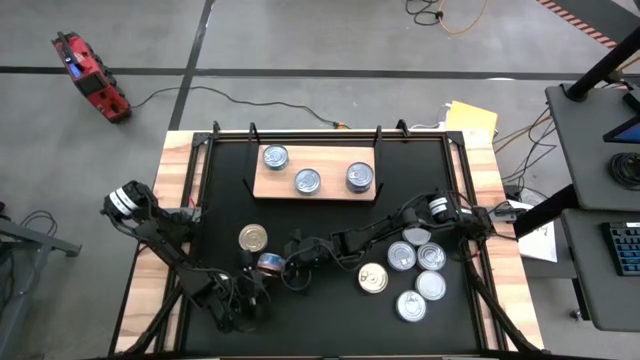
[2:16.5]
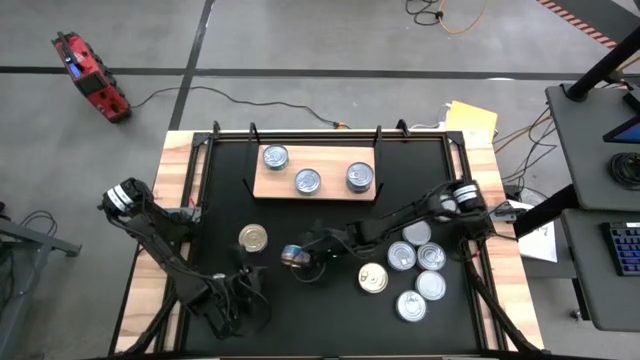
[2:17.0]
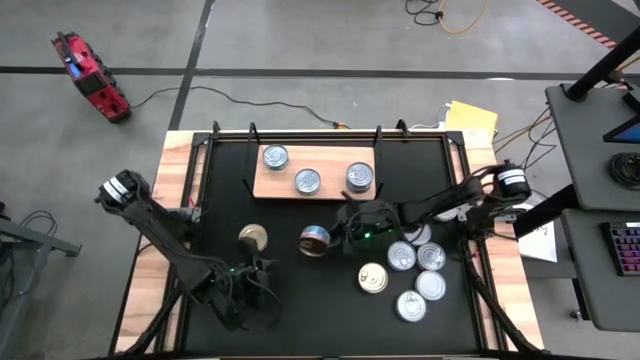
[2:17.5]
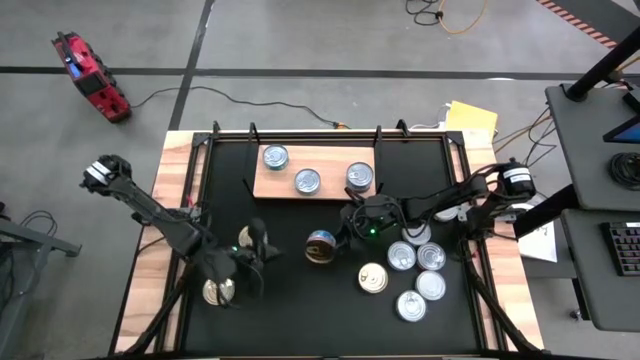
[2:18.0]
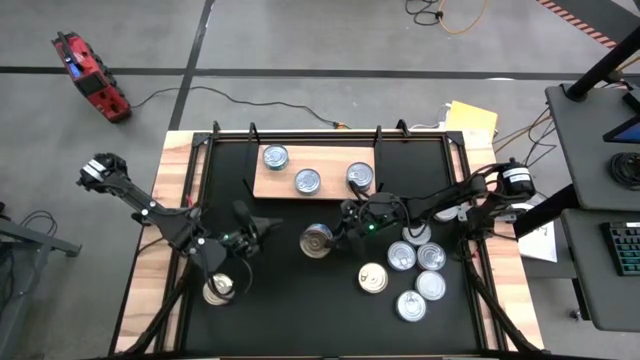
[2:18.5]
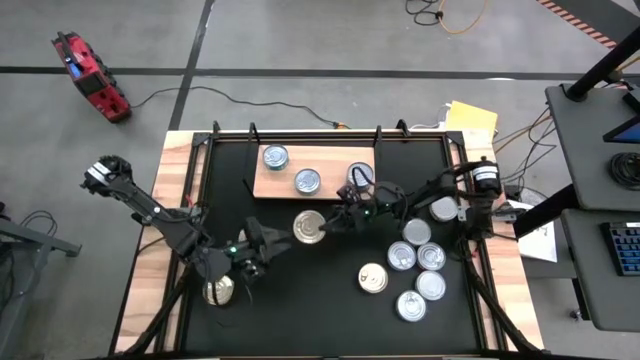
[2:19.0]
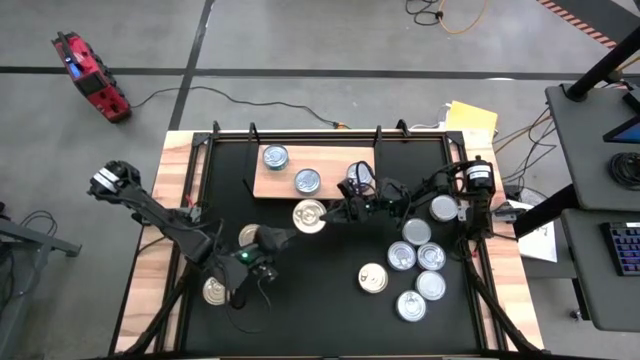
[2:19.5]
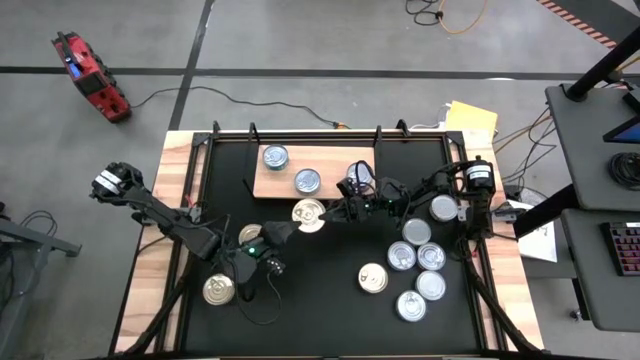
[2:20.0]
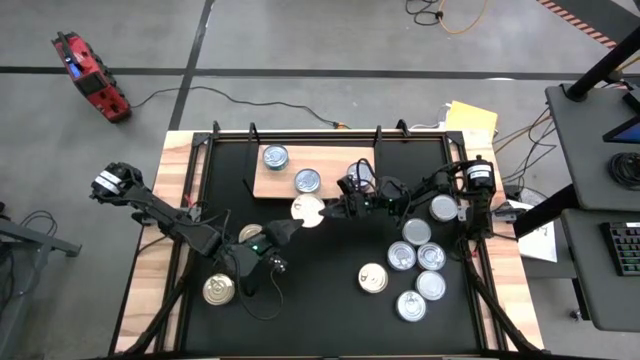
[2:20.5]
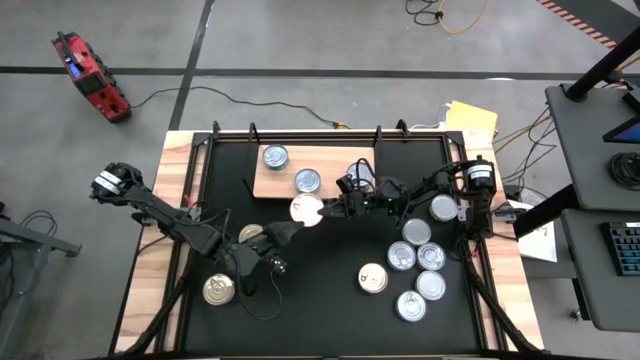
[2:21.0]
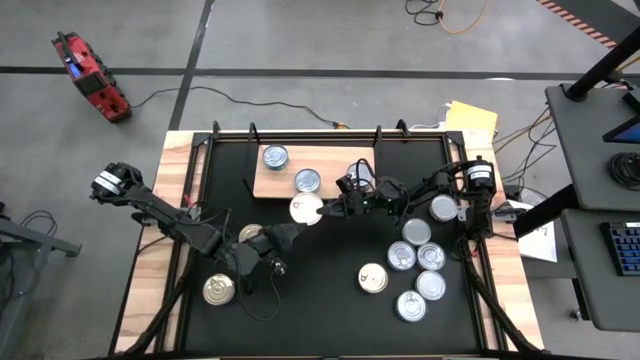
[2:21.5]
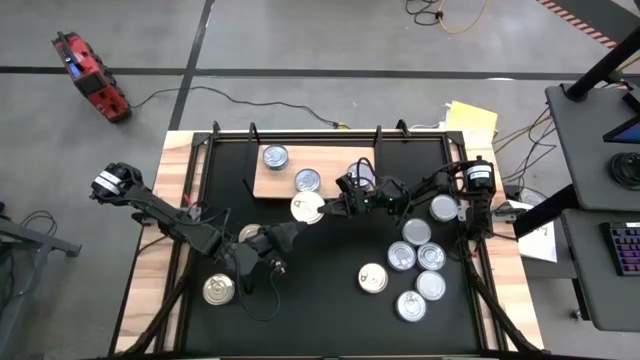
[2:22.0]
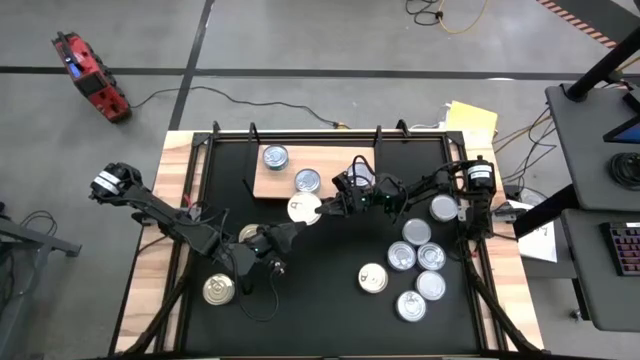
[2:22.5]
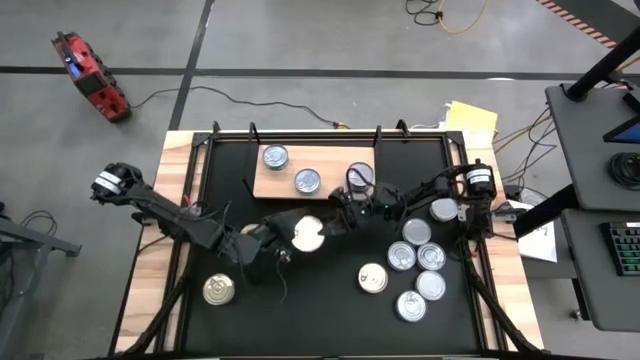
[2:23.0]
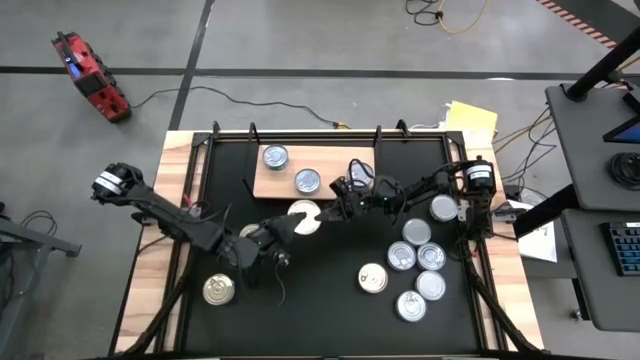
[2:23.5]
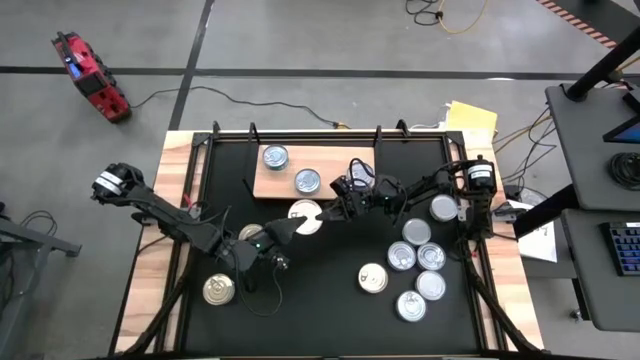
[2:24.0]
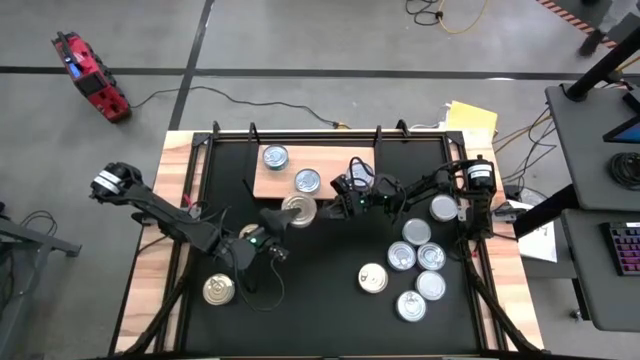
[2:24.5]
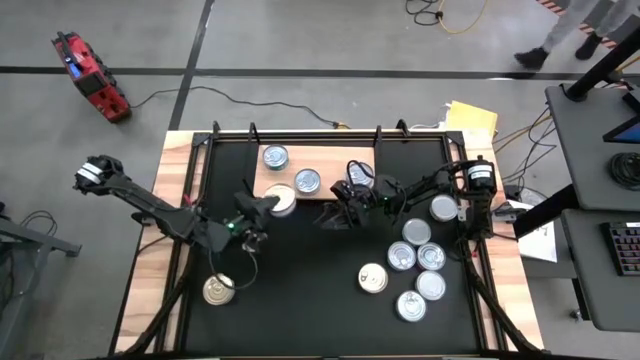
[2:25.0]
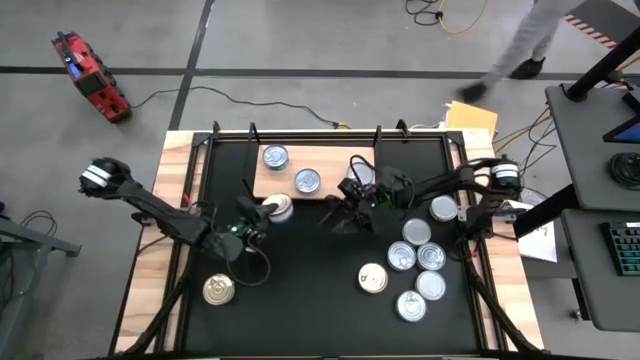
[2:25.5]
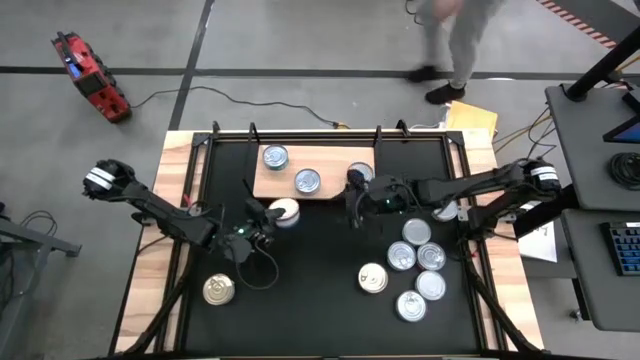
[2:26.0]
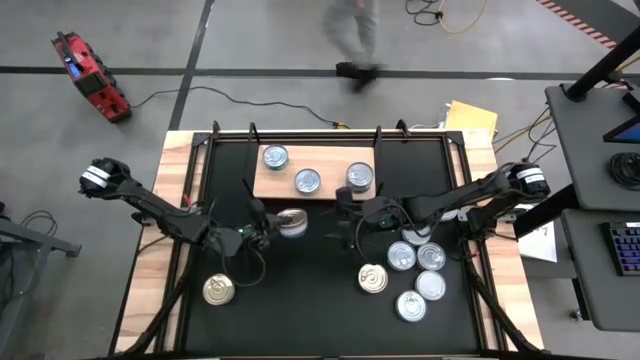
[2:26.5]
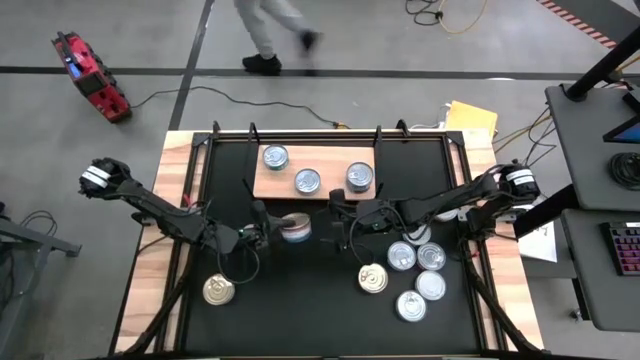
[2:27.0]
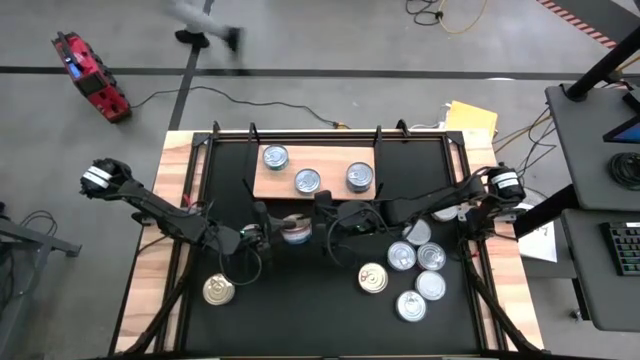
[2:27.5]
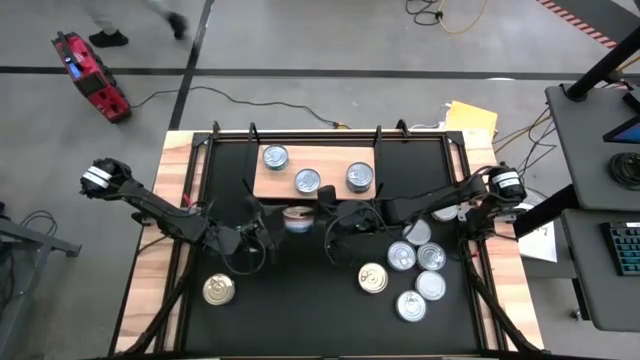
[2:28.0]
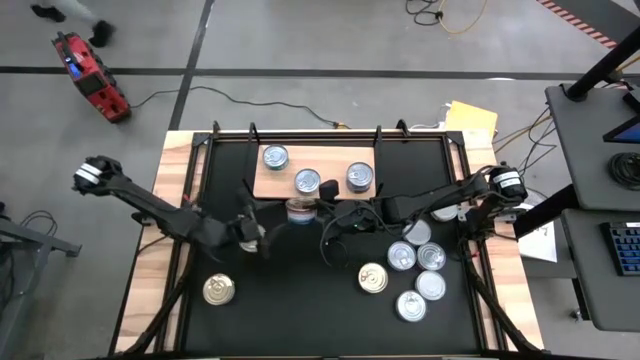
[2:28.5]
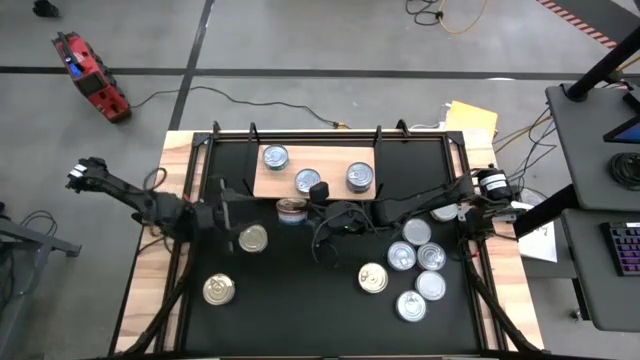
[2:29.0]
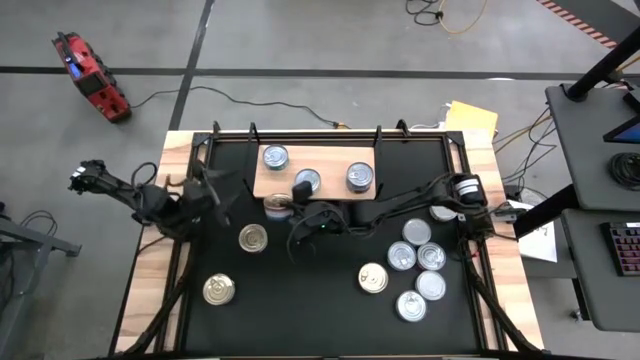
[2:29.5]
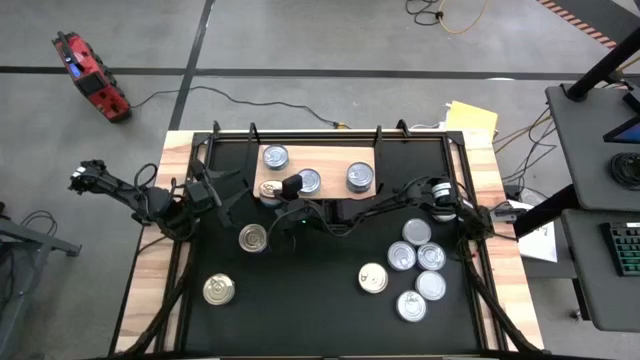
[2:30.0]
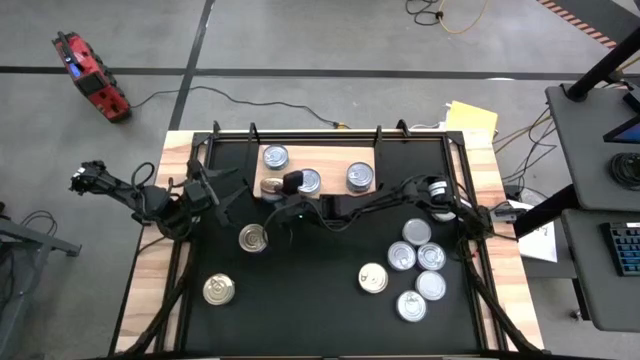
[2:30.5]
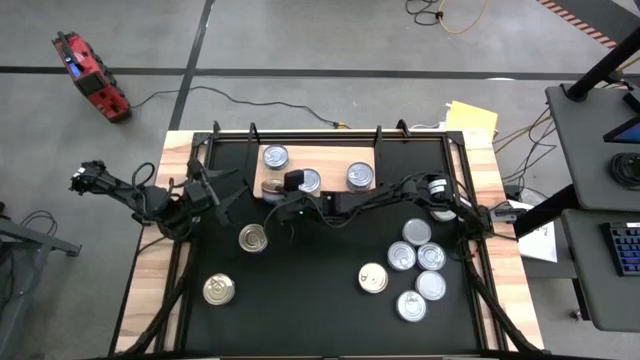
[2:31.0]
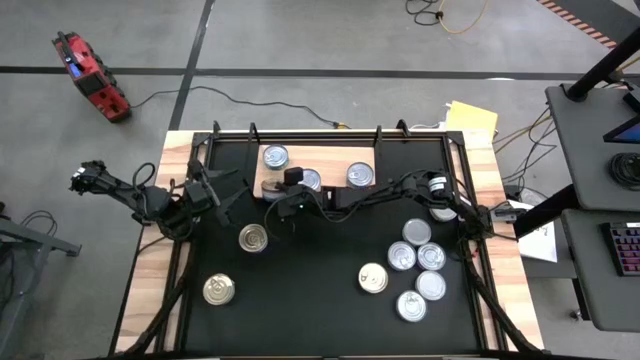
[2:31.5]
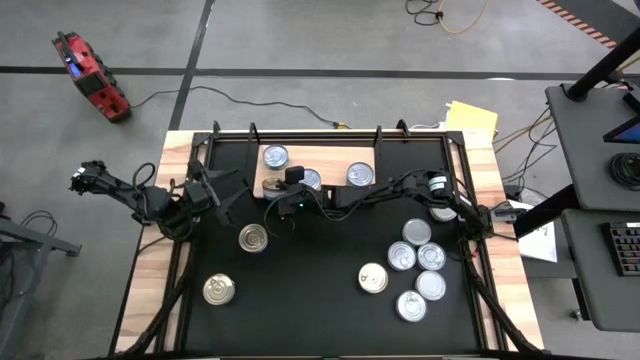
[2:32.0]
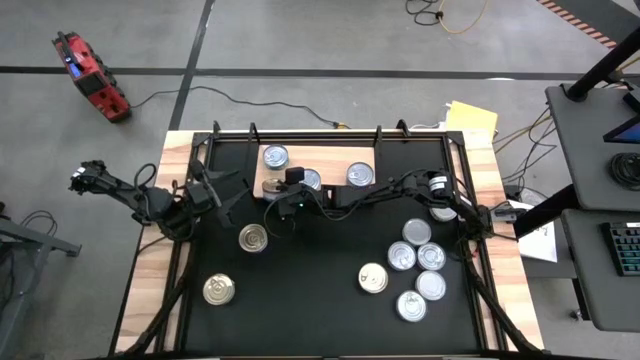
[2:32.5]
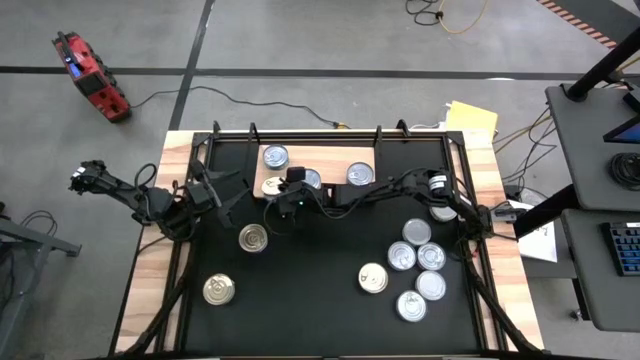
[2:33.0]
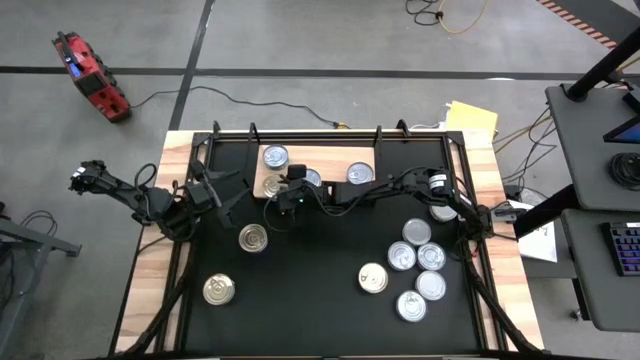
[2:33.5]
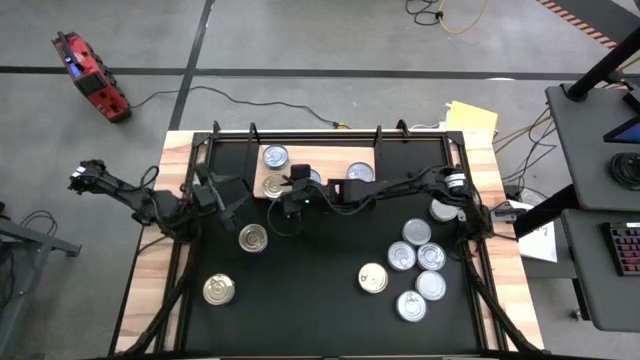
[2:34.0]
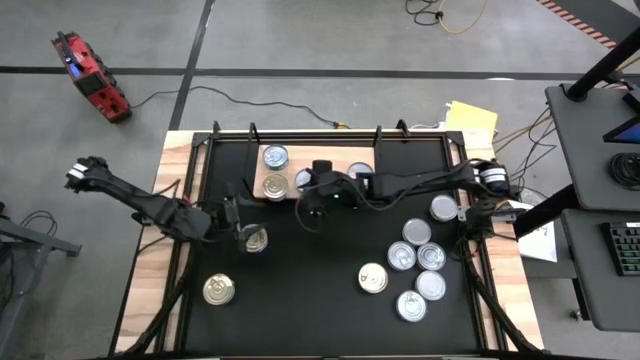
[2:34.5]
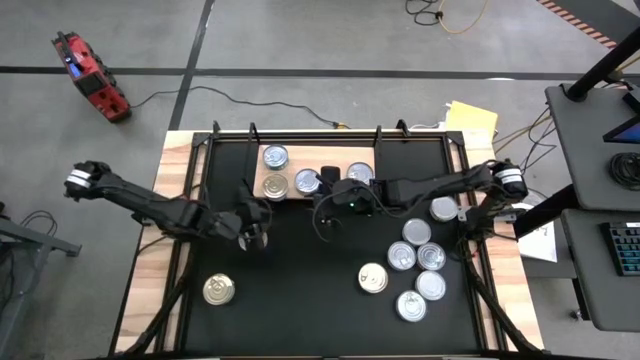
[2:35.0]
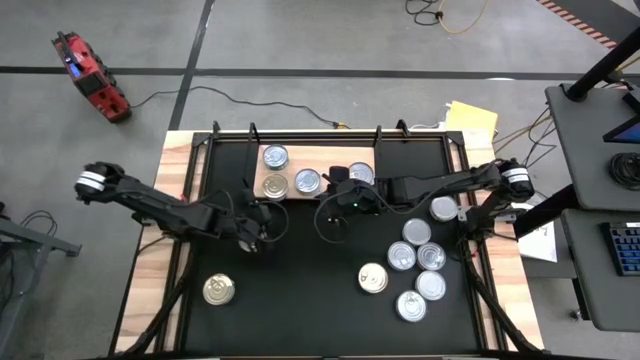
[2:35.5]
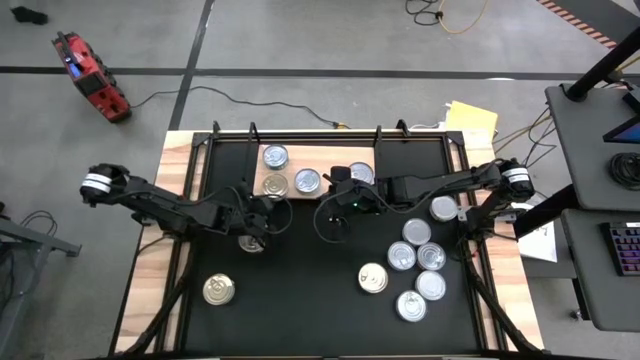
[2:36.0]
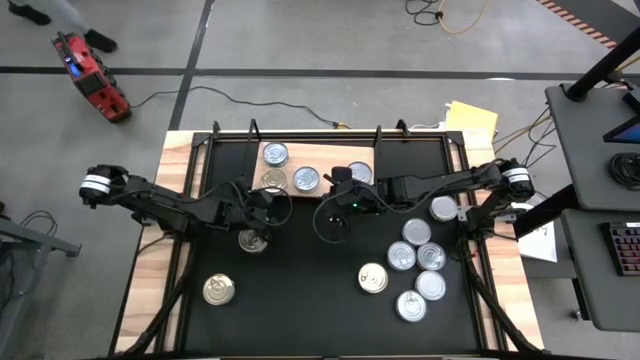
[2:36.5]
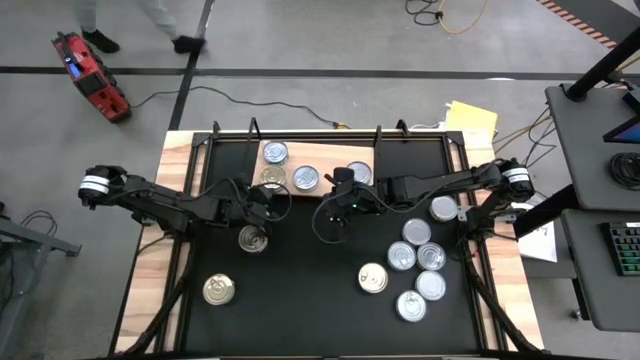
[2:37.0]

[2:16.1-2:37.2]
Task: Stack canned seafood by type on shelf
Put the blue tuna can on the shelf
